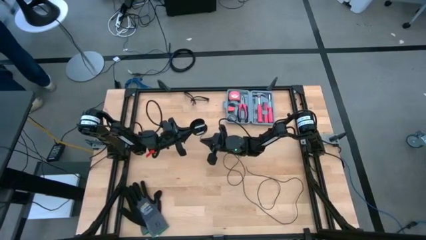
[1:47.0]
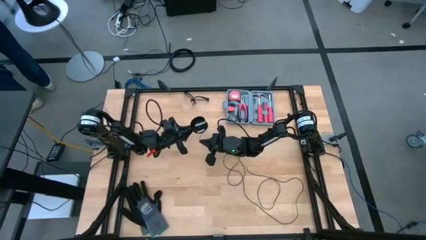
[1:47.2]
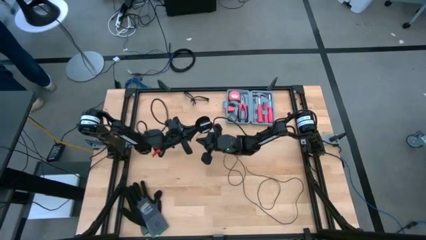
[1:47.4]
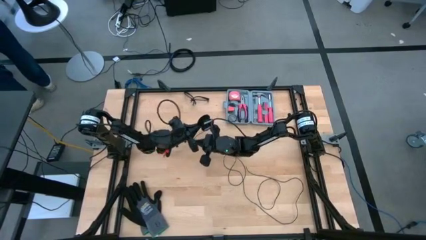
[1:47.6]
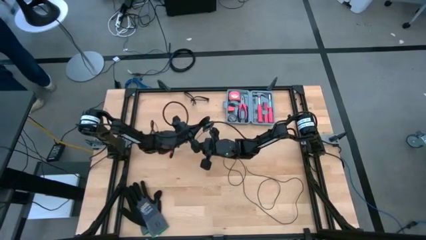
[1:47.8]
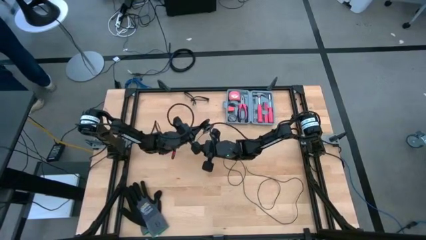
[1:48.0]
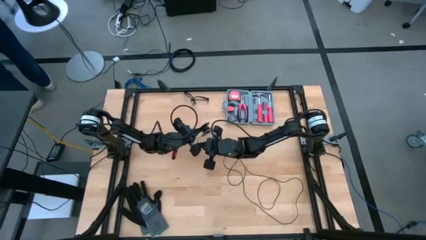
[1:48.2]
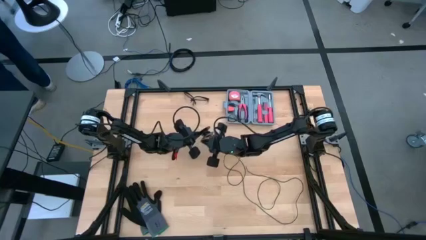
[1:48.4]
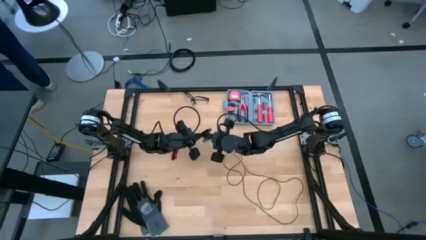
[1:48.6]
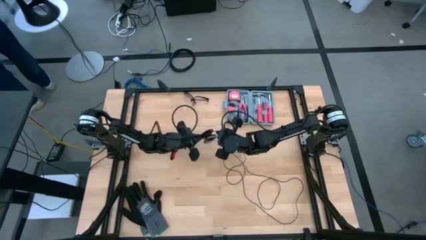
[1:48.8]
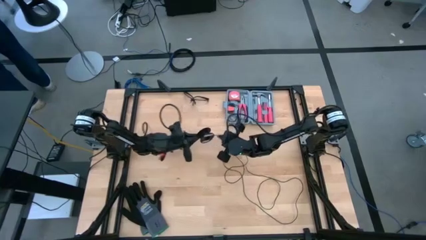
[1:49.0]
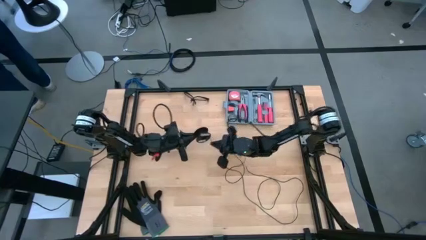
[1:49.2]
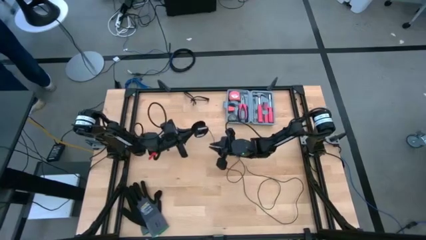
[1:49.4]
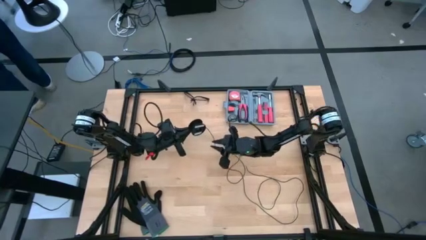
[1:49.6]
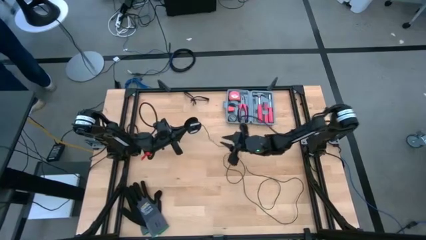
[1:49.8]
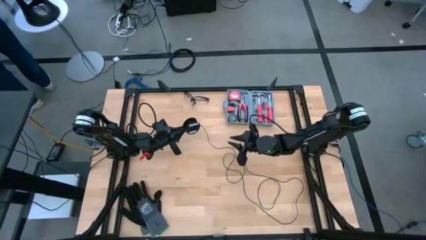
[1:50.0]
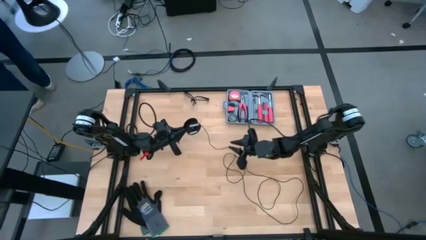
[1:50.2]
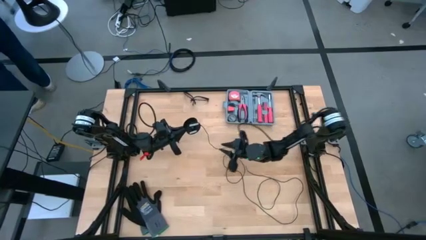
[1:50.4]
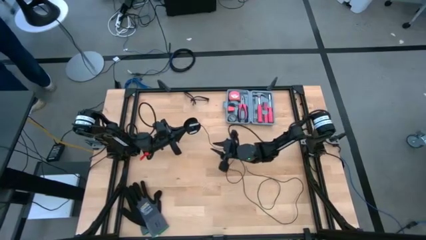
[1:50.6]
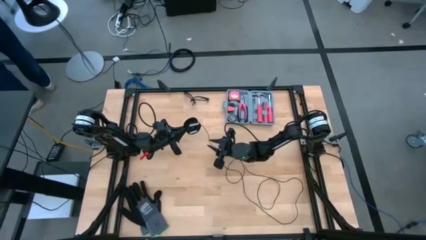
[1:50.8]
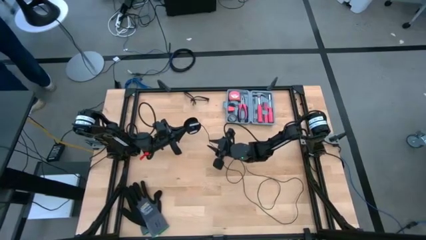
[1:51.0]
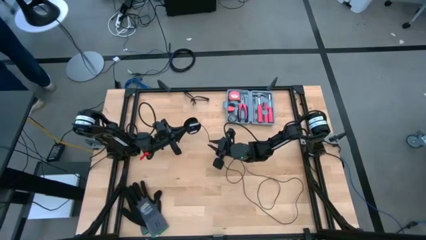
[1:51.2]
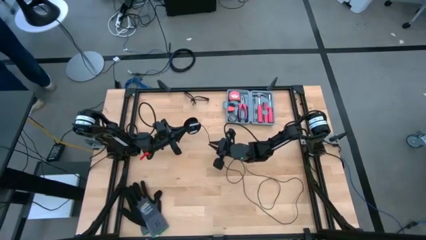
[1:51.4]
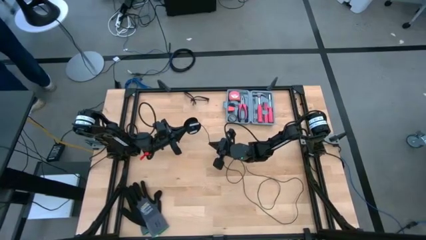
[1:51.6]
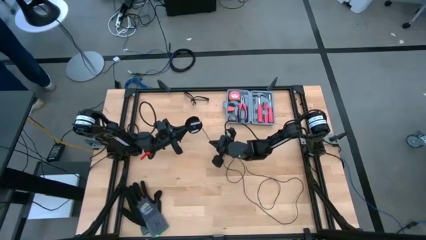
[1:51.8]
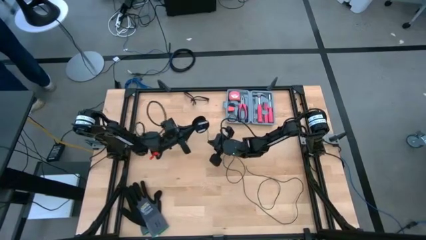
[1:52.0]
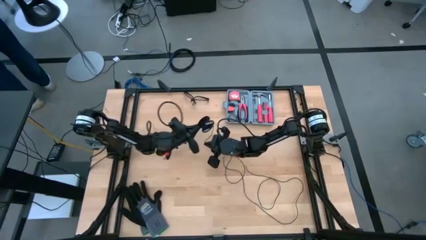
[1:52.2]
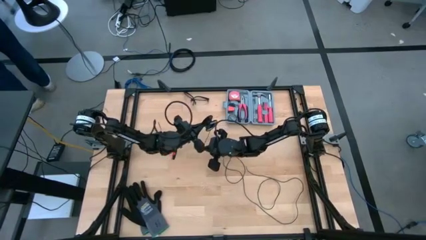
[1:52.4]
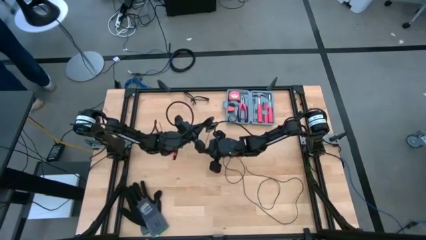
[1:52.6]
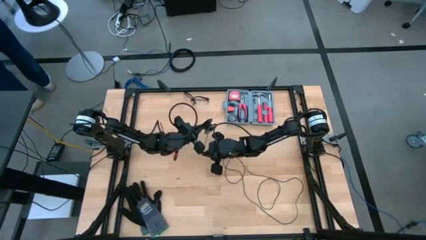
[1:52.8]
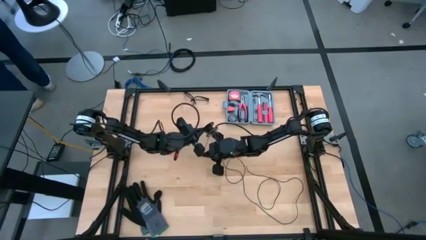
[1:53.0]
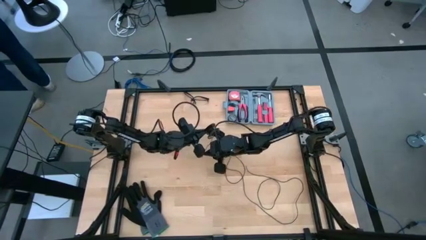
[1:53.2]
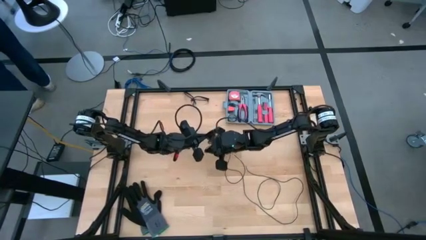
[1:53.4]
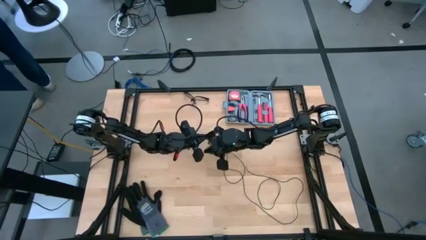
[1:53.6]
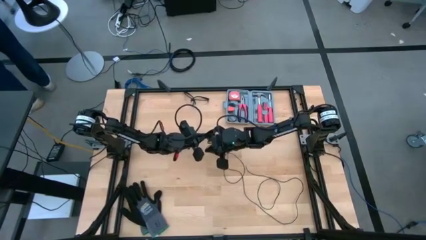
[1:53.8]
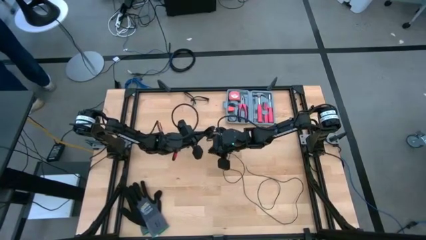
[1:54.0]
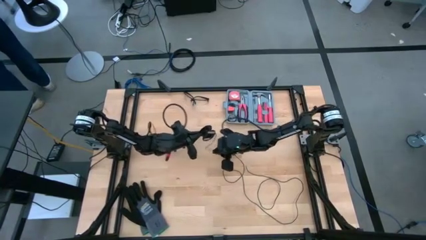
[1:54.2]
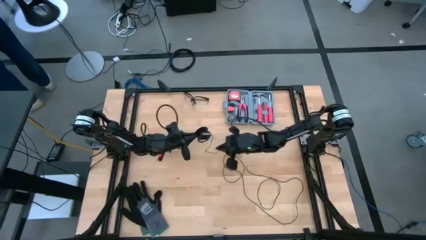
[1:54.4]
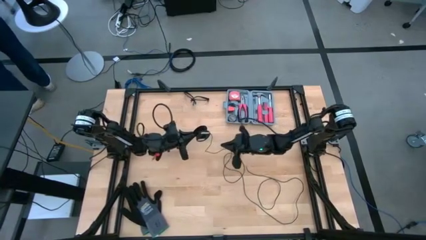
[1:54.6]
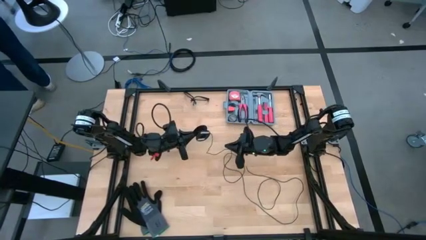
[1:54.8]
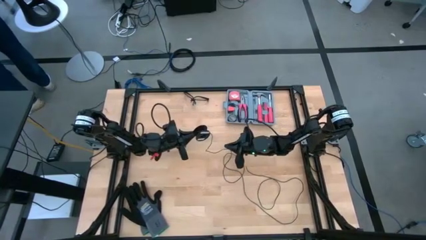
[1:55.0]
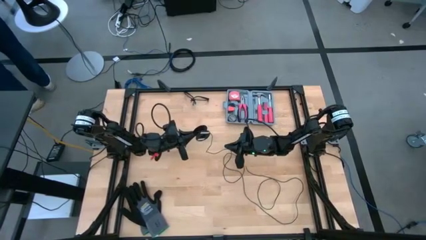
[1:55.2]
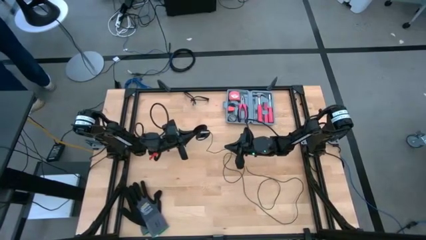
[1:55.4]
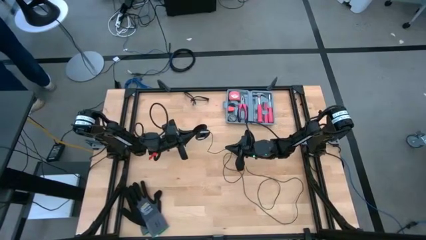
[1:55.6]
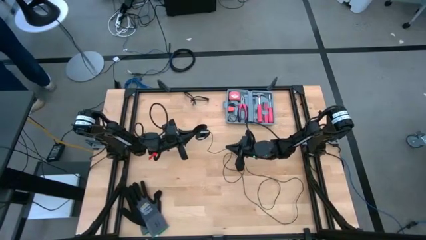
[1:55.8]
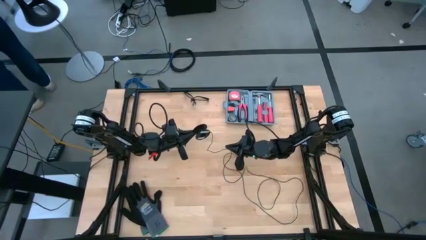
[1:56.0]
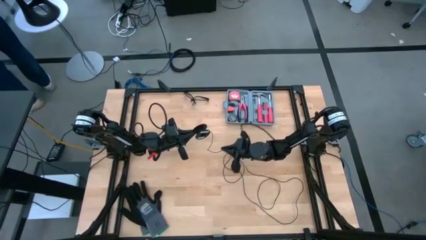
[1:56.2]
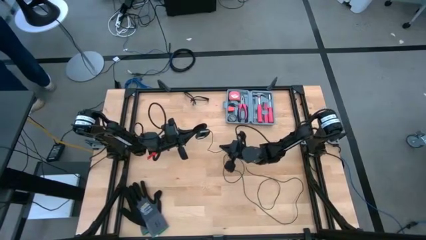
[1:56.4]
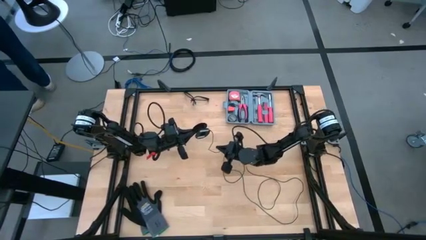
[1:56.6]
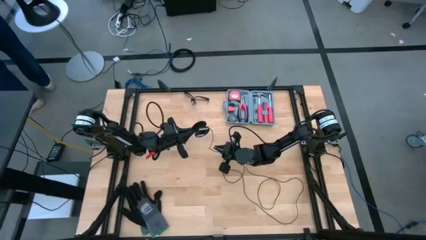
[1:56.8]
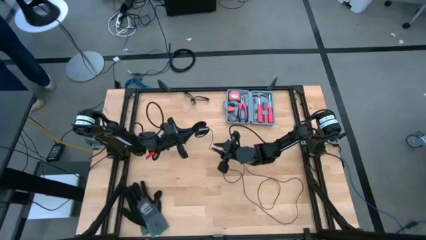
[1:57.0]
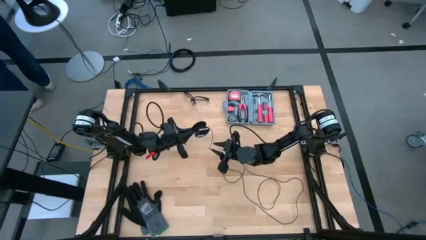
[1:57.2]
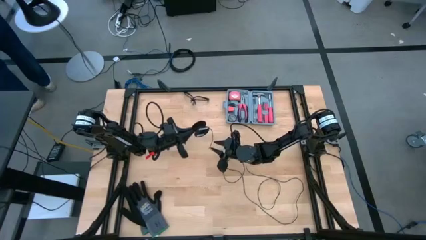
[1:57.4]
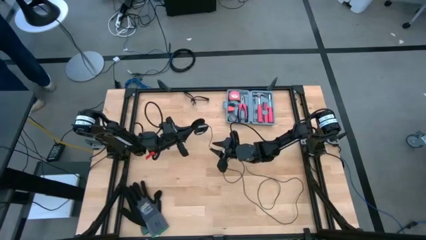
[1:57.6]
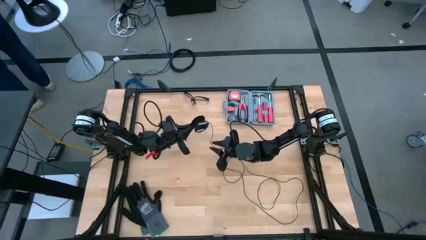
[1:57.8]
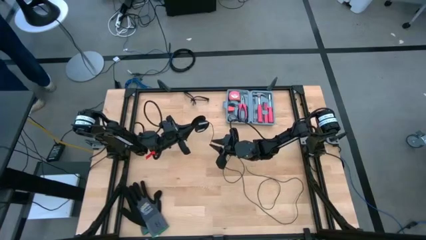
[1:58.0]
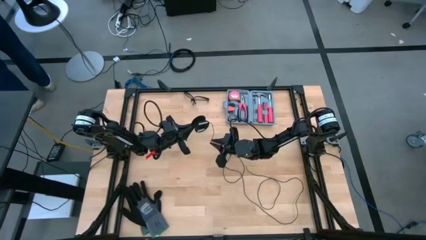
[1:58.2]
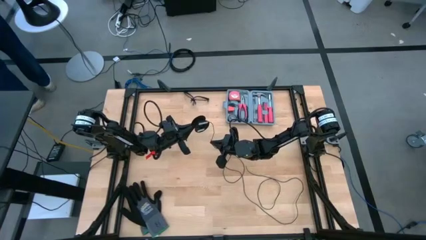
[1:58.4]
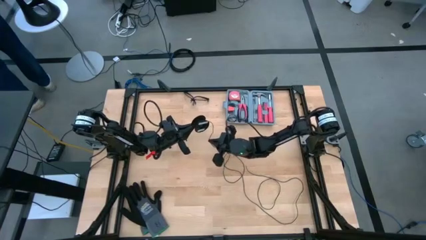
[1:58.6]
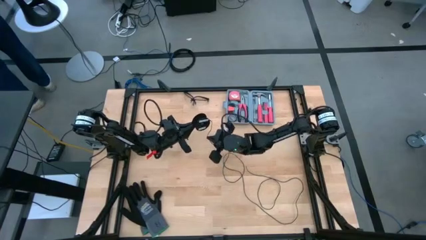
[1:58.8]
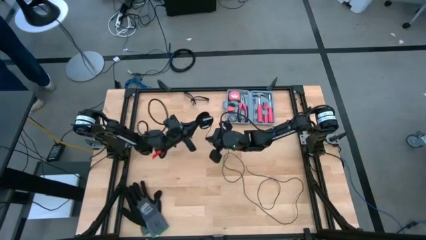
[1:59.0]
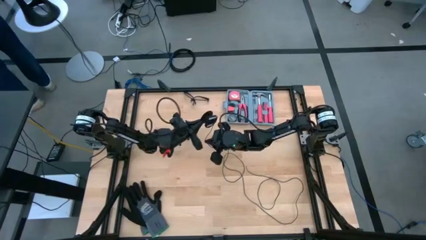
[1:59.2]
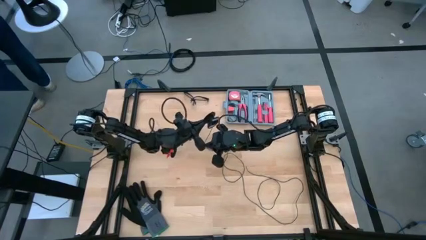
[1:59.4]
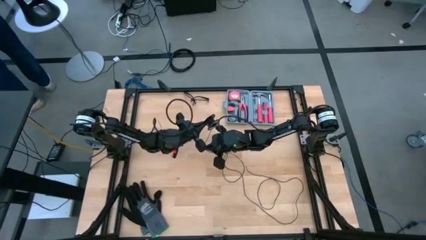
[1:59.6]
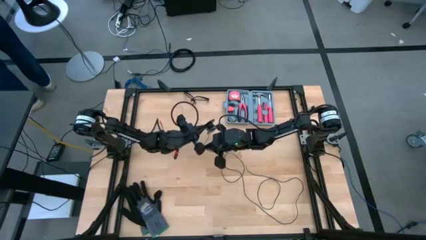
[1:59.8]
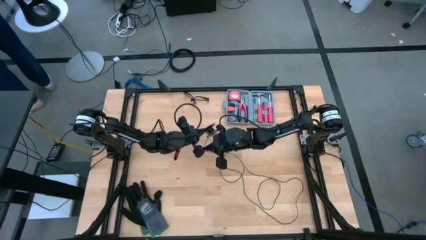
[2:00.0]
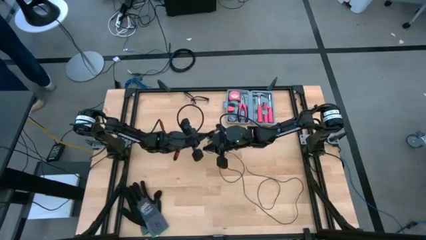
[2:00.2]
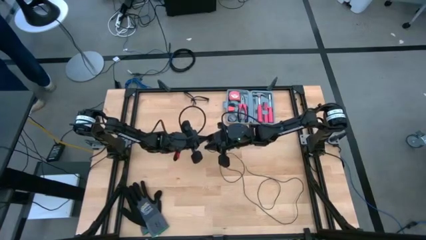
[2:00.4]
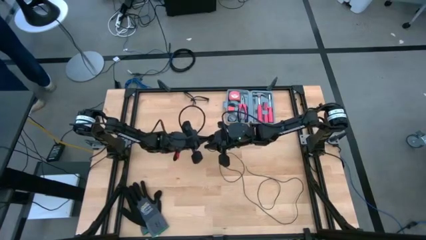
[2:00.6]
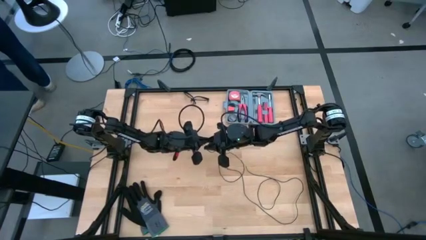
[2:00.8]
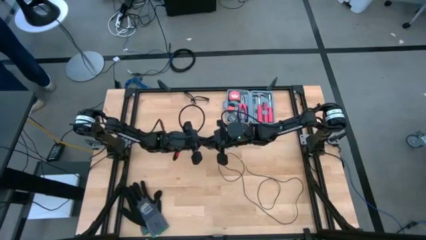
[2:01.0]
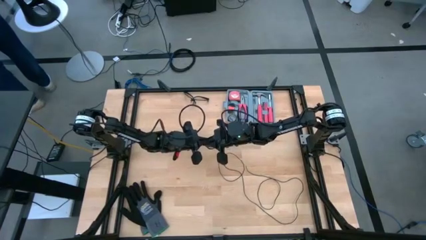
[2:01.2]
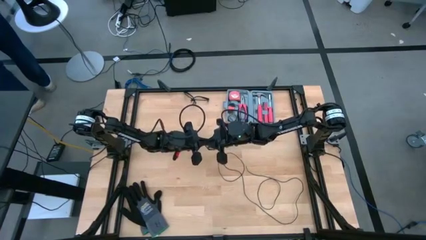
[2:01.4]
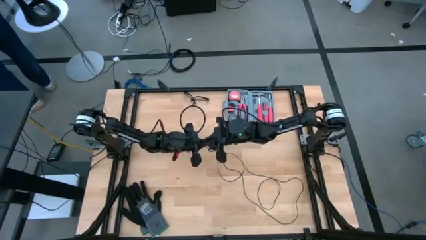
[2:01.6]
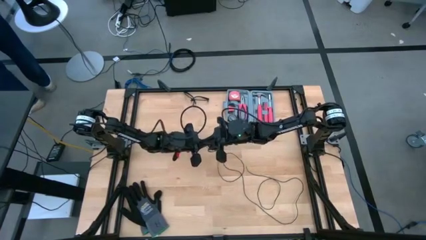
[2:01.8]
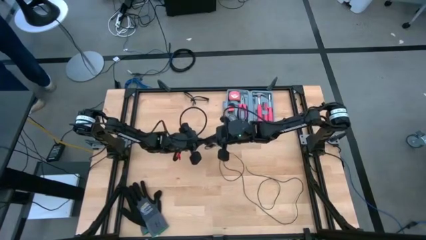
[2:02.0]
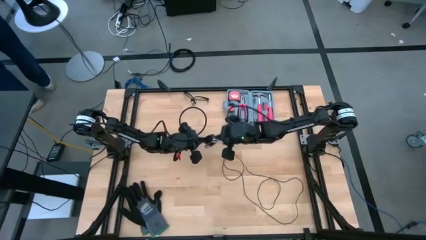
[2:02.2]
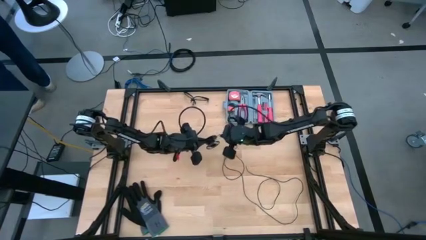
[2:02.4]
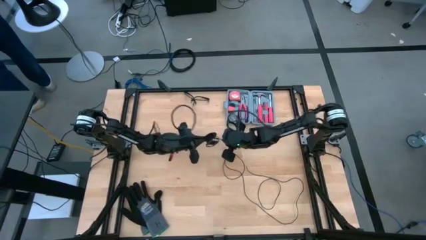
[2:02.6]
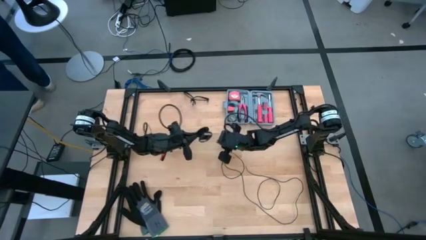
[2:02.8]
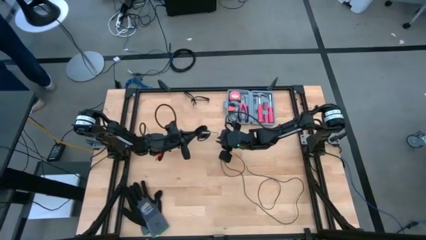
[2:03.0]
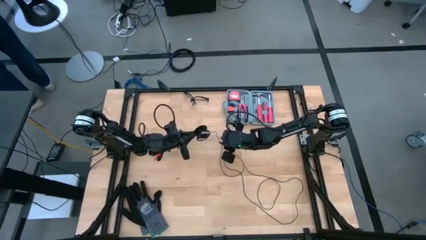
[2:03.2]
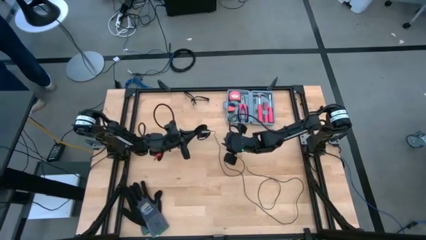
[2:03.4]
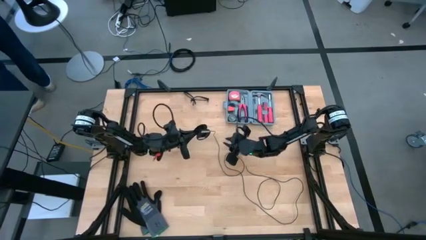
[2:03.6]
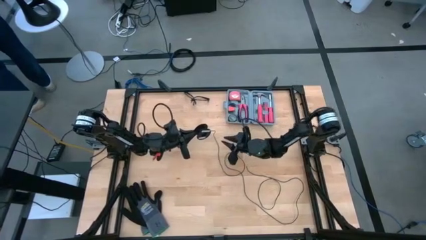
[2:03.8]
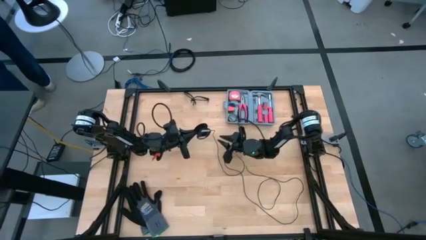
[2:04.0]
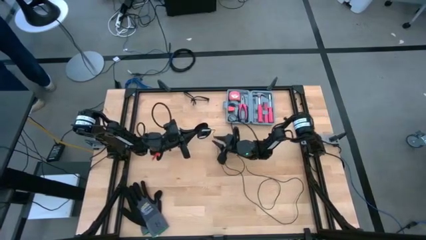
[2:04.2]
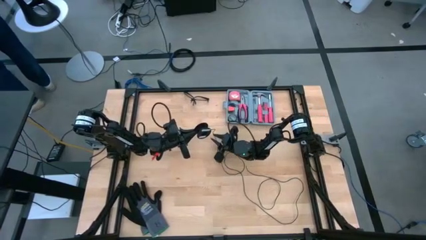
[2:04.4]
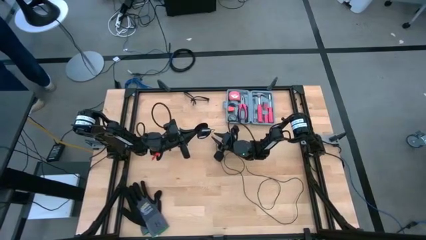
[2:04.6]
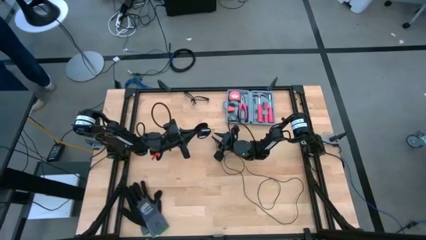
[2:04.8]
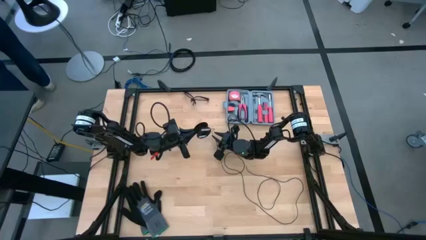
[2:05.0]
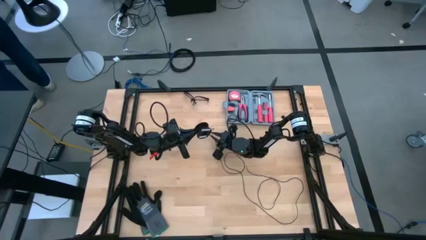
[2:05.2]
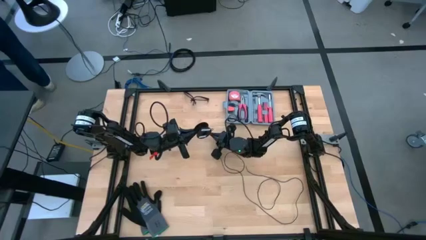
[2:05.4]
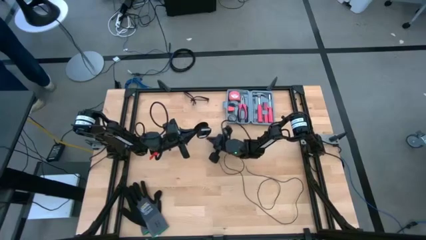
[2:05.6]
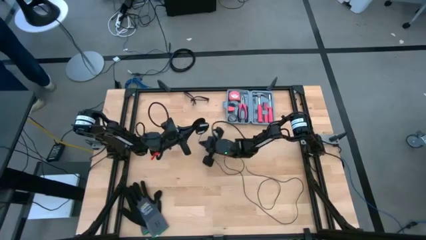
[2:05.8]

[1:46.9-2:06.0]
Task: Coil cords
Coil the black wire onto the spool
